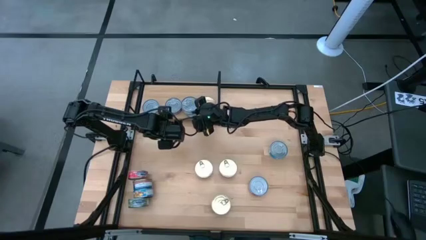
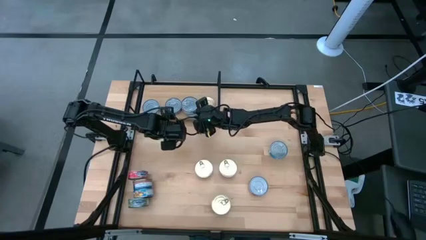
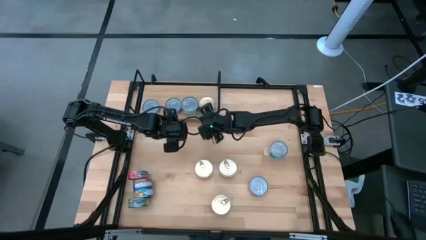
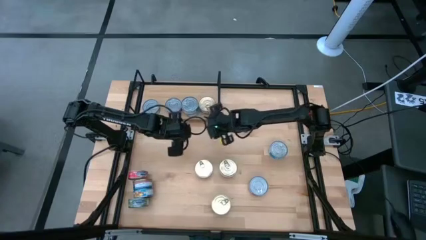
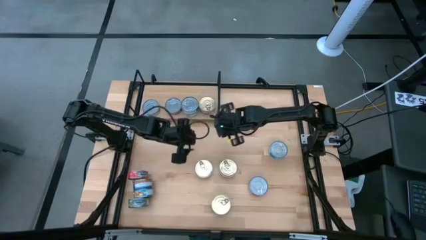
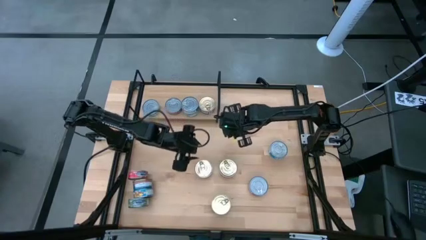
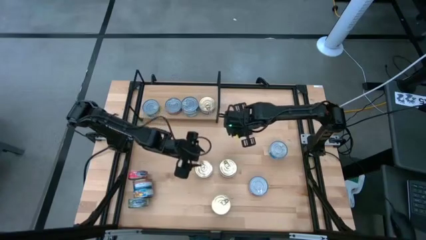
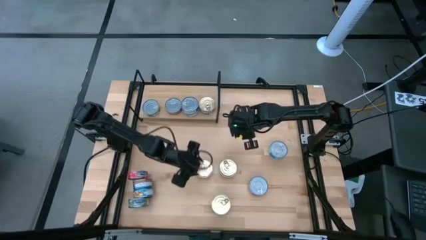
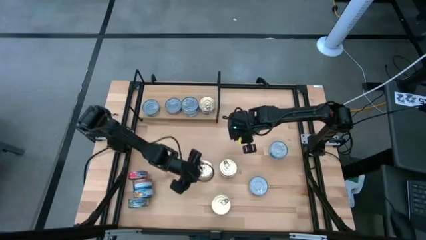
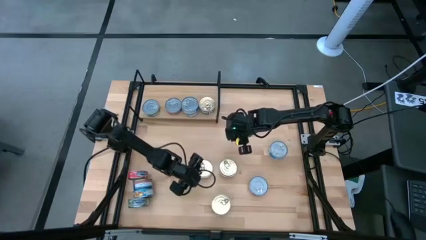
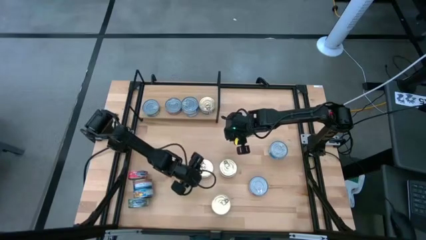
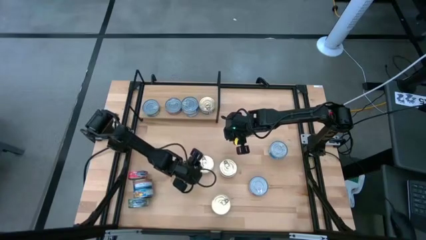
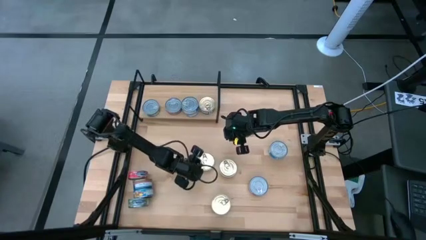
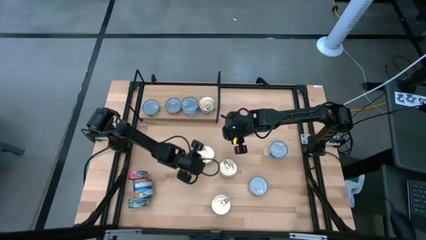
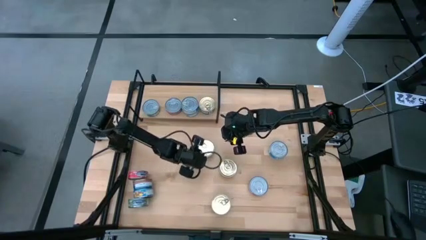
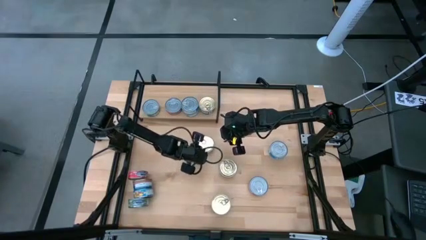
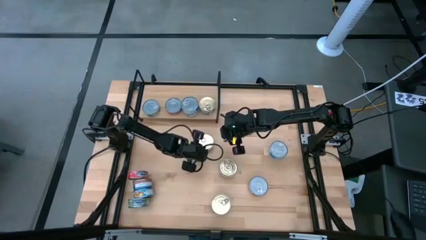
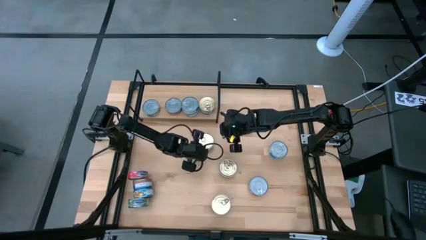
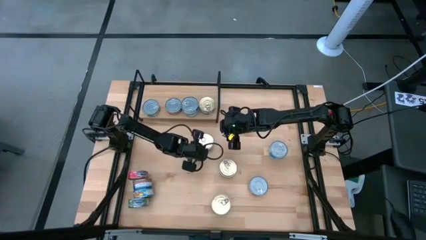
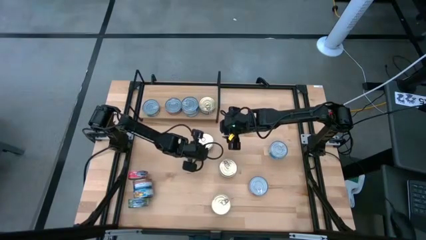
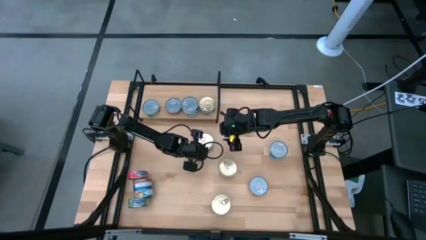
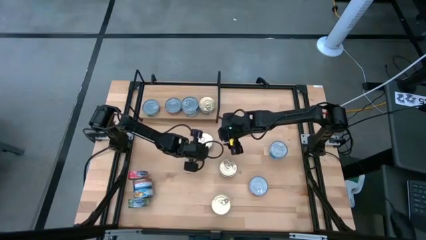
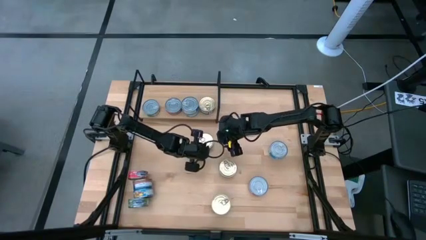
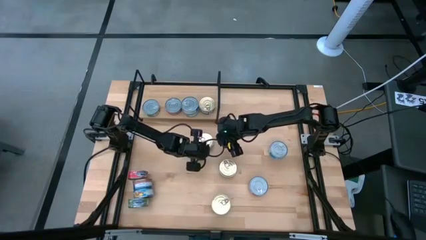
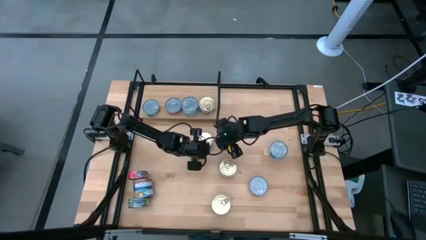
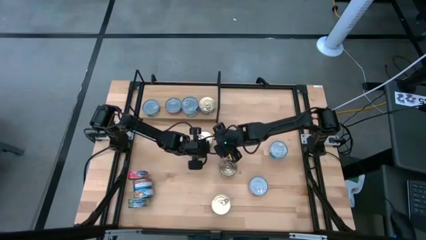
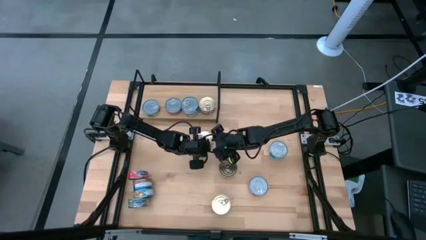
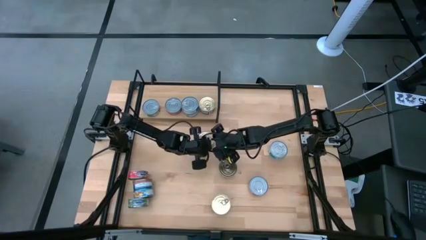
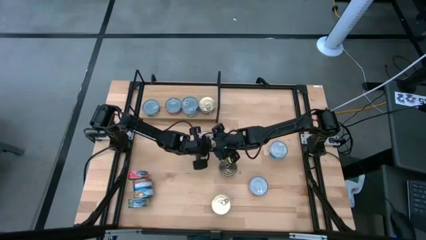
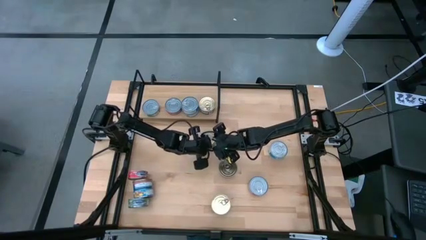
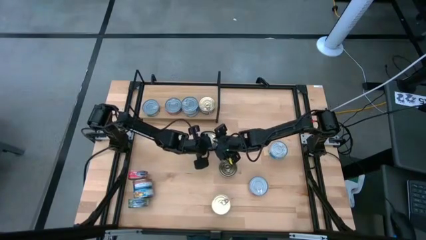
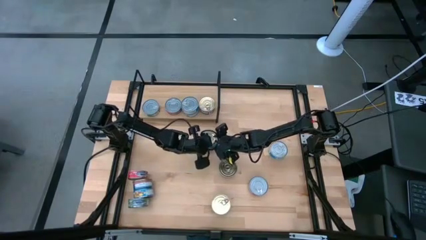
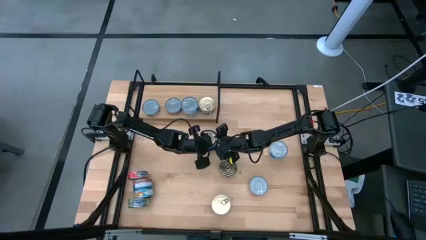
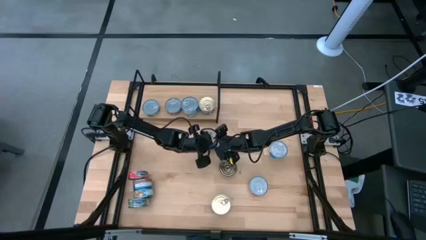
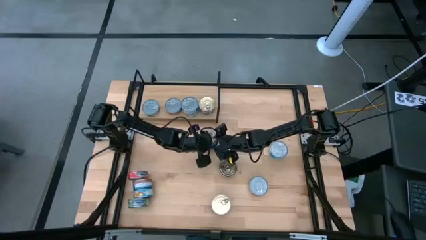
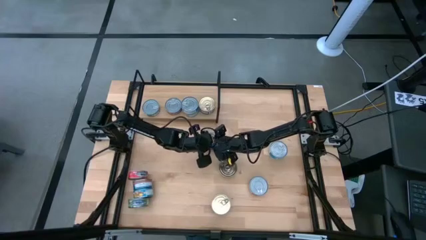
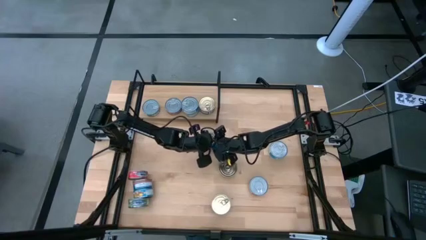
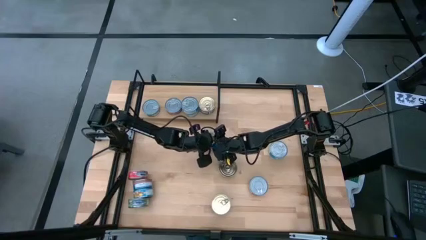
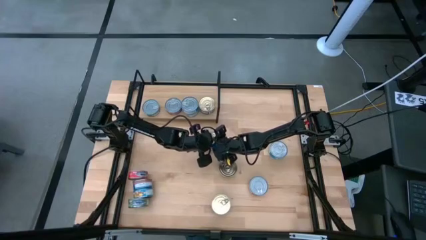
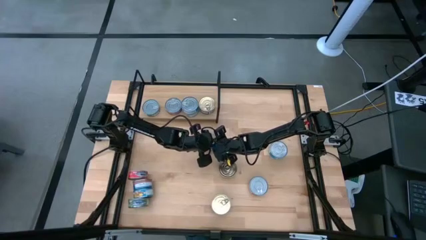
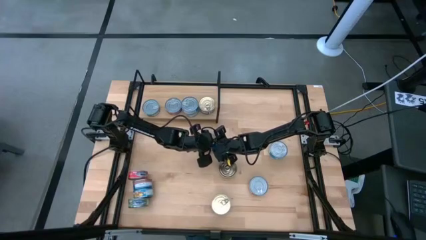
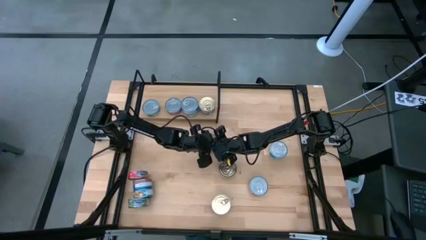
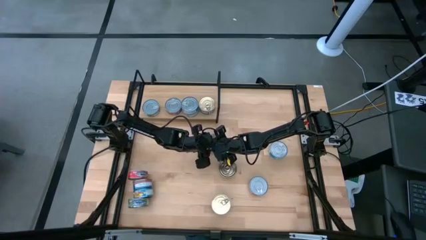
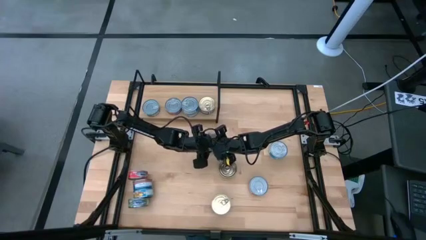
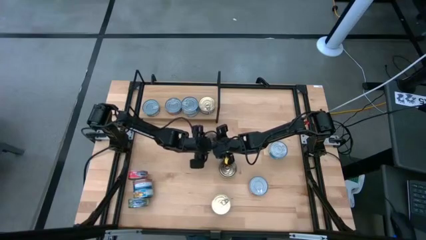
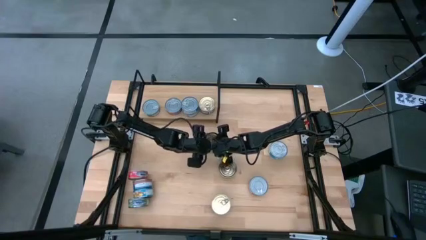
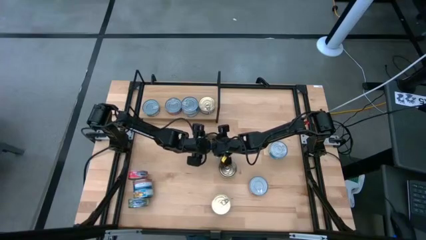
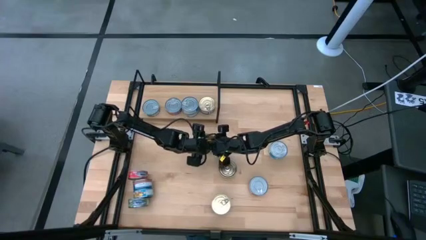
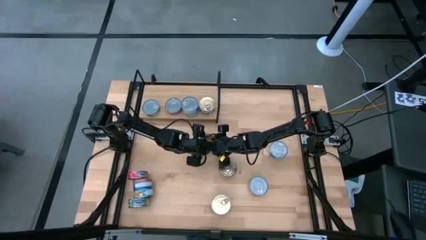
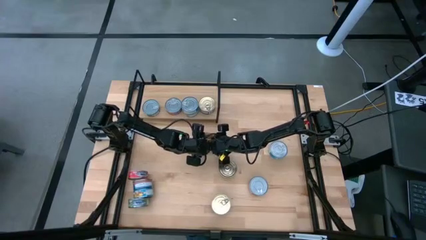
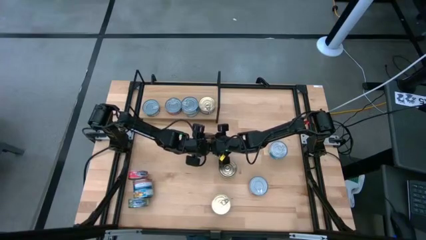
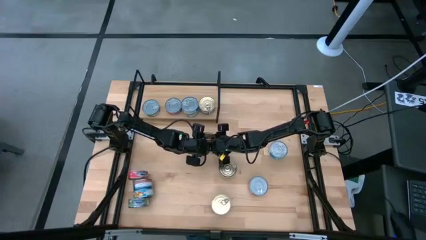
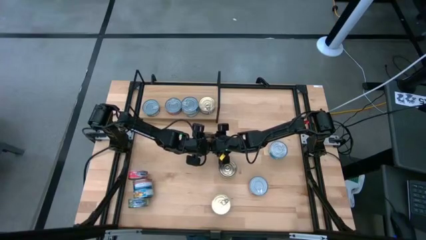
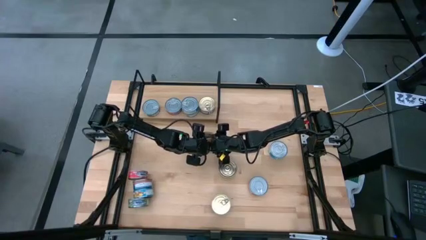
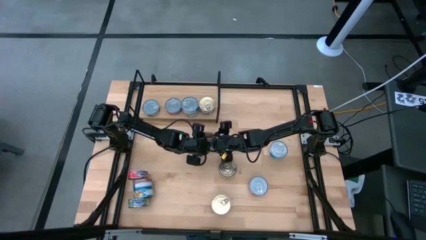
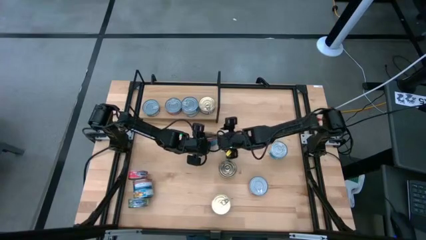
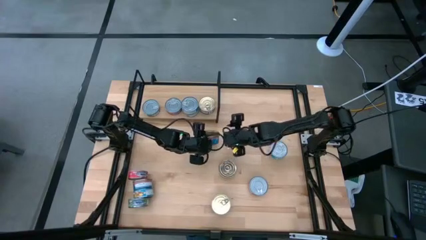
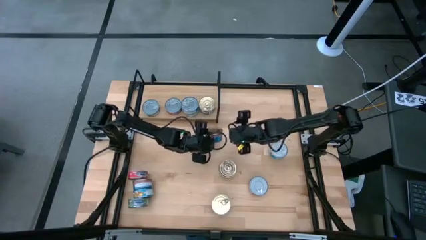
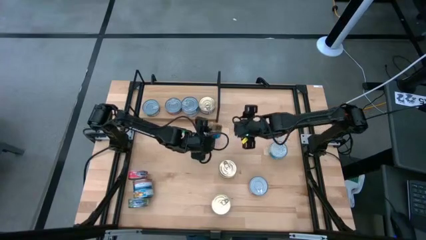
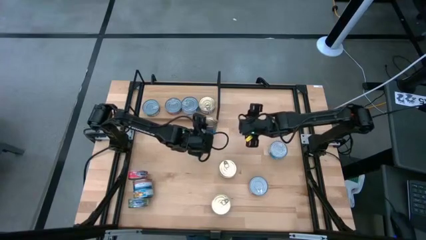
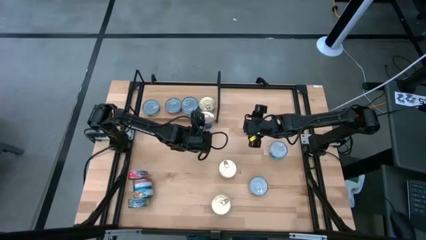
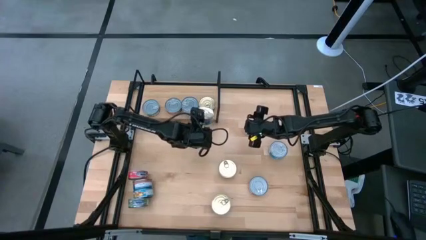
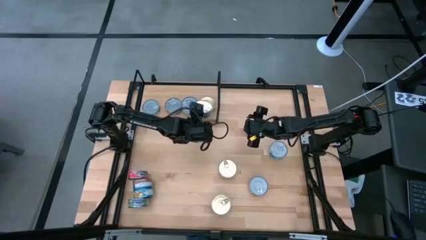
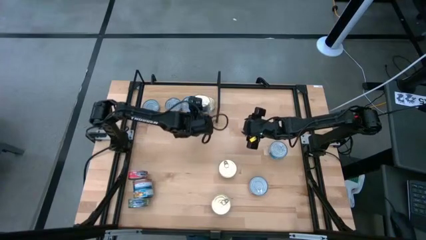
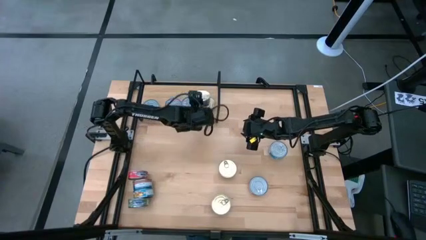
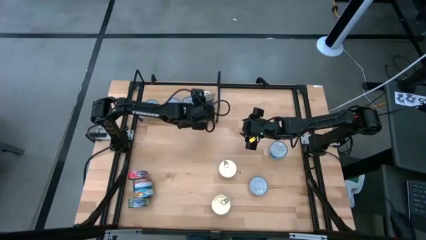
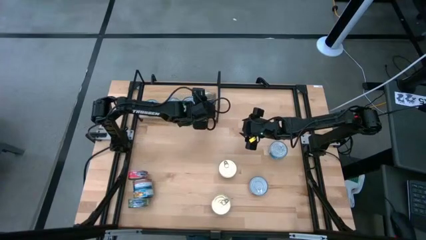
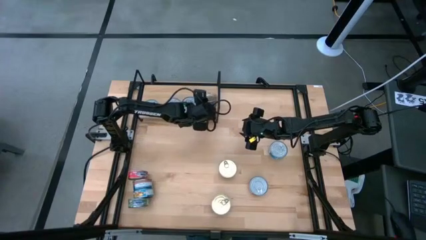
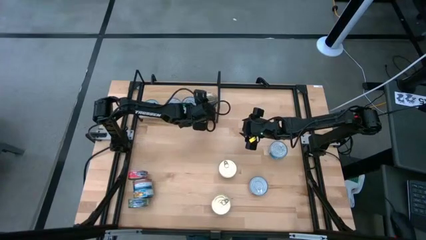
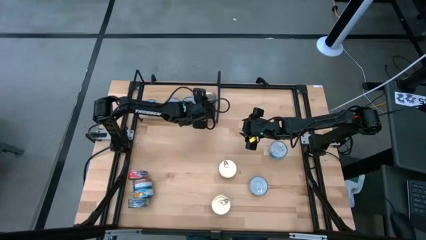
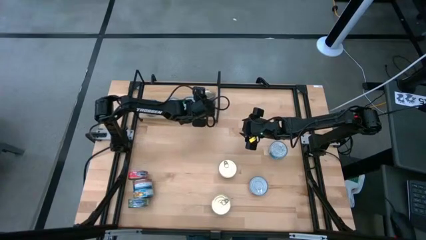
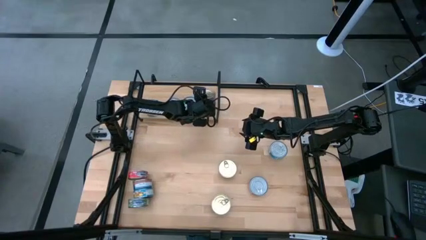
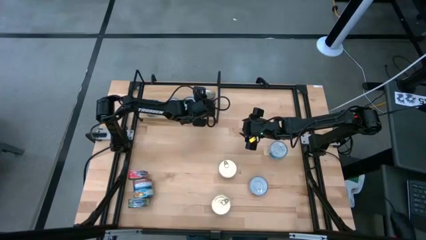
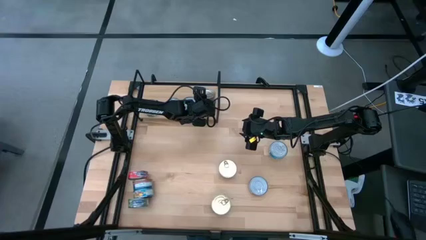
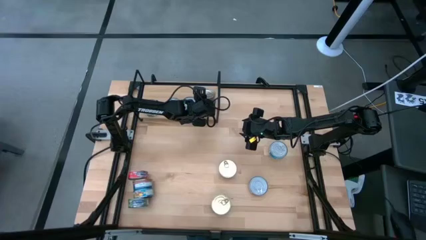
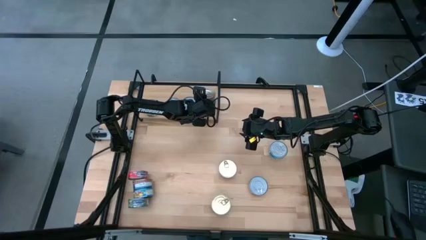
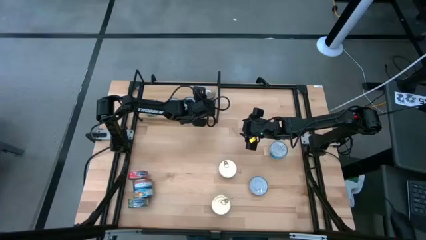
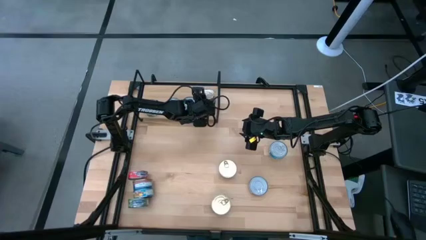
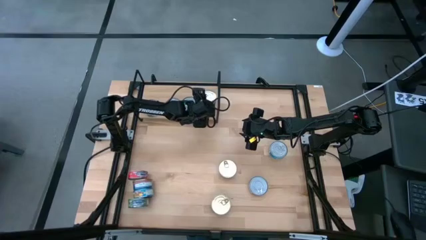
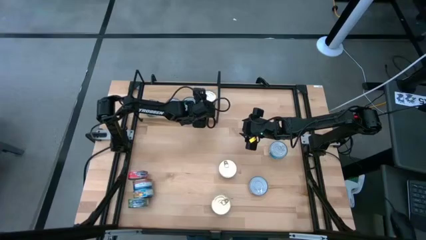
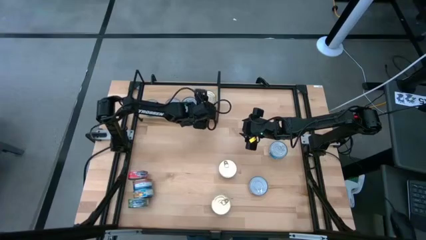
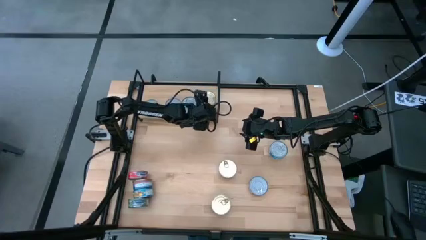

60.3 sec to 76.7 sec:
Task: Stack canned seafood by type on shelf
Stack the blue pink tuna can on top of the blue pink tuna can on the shelf
